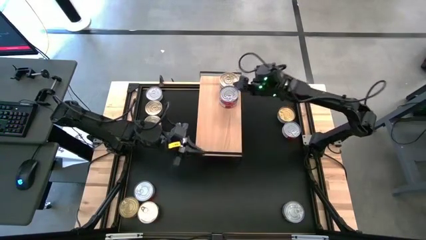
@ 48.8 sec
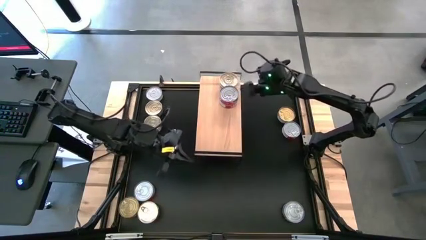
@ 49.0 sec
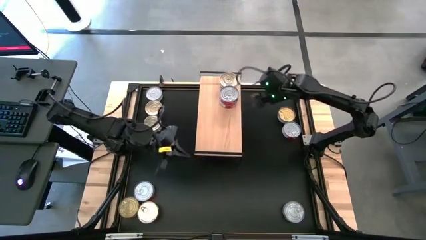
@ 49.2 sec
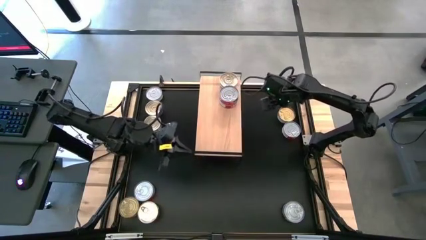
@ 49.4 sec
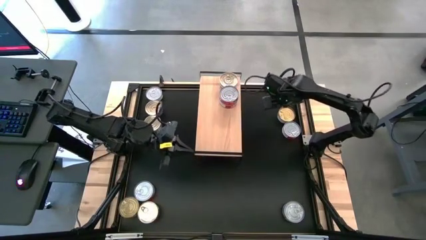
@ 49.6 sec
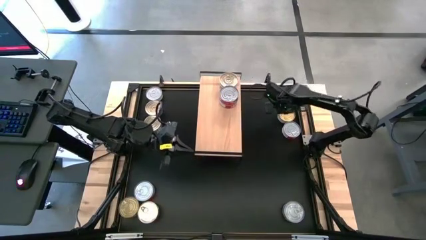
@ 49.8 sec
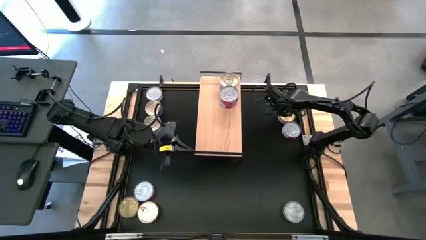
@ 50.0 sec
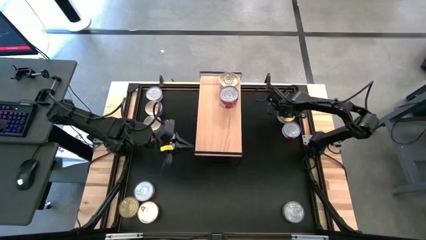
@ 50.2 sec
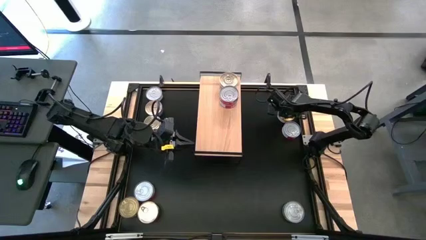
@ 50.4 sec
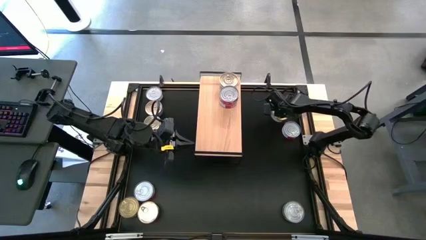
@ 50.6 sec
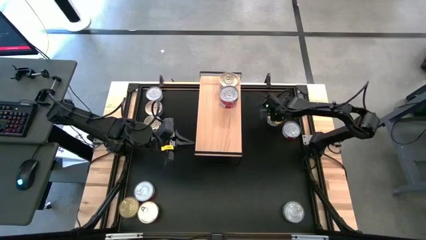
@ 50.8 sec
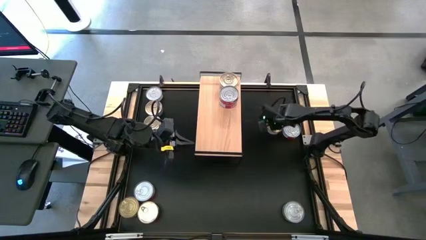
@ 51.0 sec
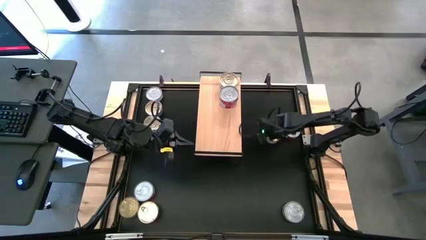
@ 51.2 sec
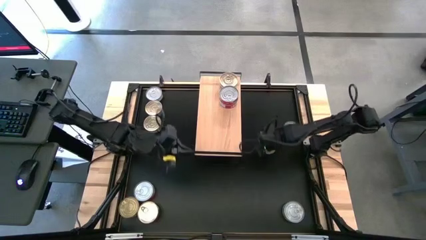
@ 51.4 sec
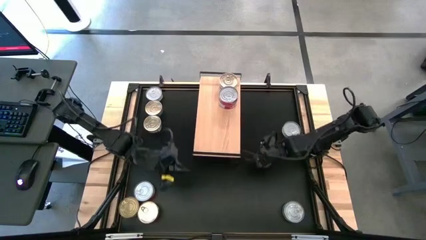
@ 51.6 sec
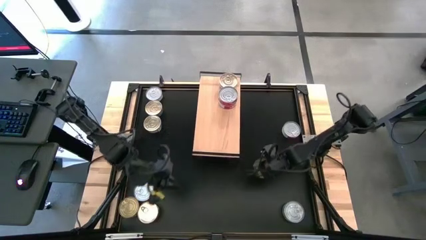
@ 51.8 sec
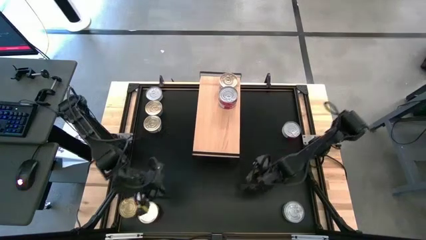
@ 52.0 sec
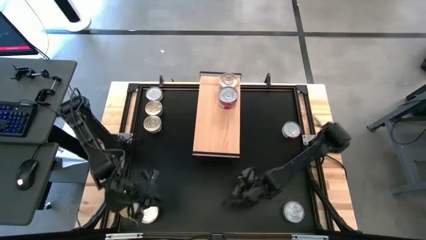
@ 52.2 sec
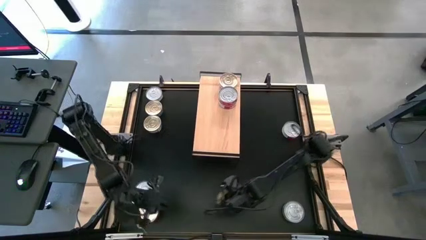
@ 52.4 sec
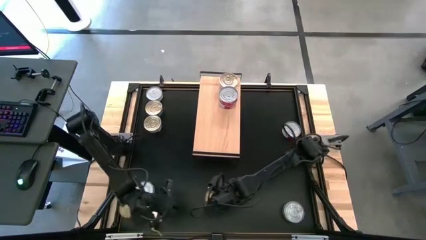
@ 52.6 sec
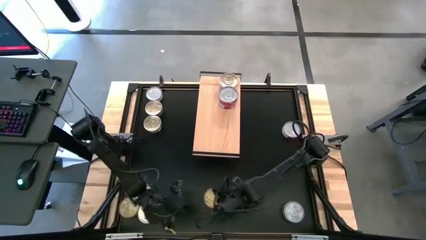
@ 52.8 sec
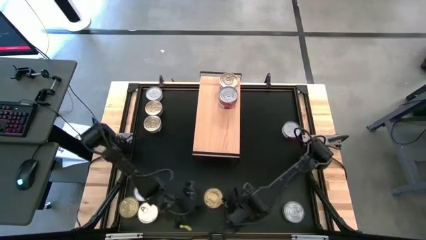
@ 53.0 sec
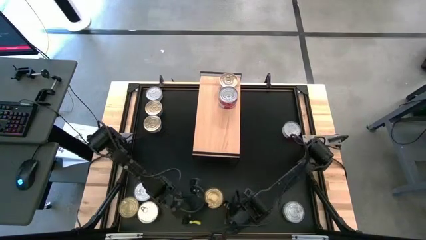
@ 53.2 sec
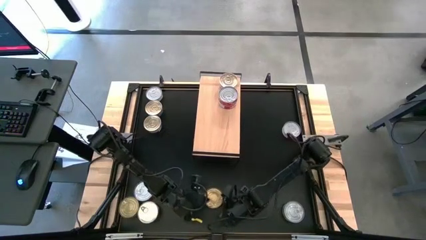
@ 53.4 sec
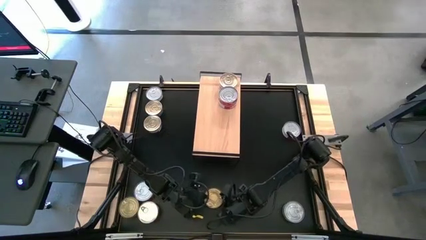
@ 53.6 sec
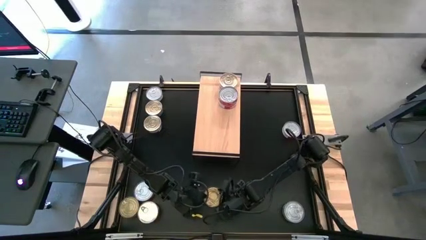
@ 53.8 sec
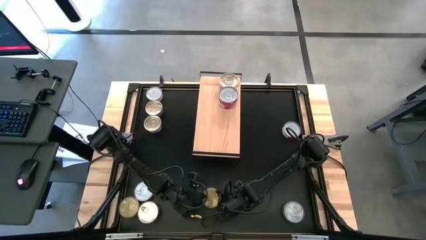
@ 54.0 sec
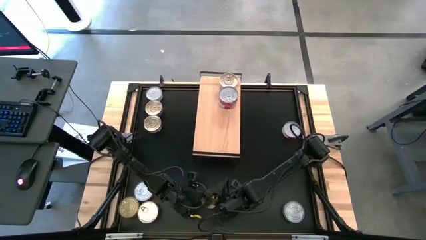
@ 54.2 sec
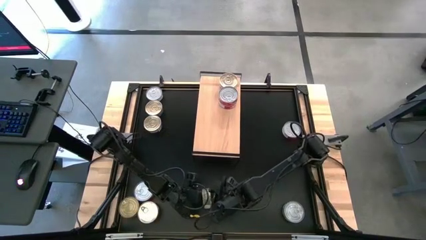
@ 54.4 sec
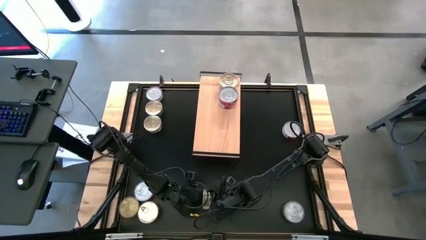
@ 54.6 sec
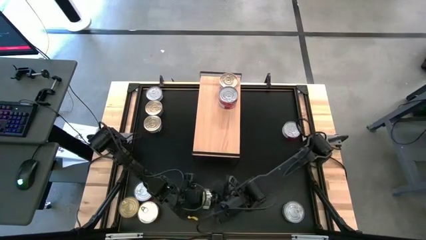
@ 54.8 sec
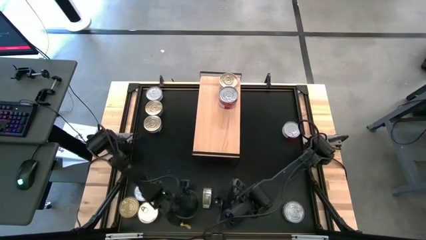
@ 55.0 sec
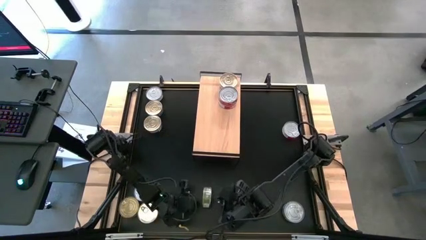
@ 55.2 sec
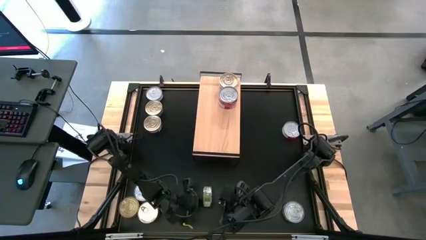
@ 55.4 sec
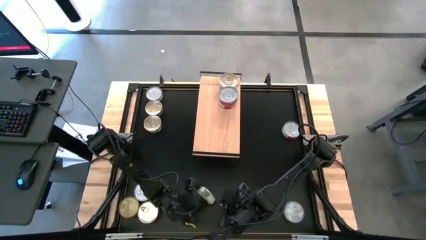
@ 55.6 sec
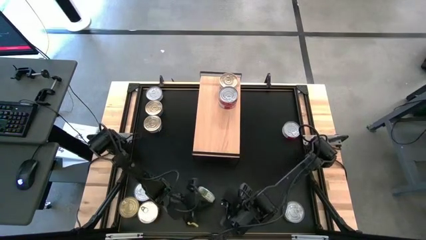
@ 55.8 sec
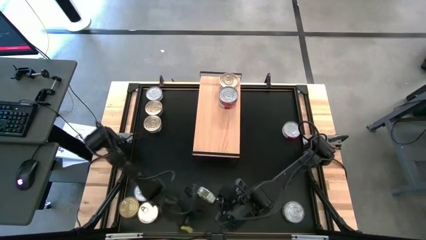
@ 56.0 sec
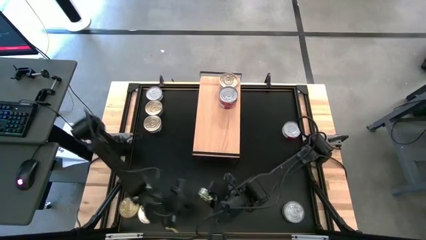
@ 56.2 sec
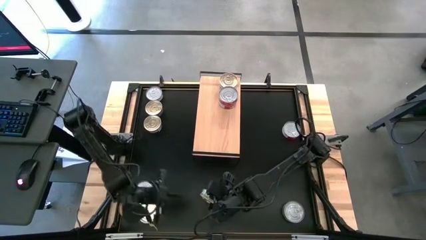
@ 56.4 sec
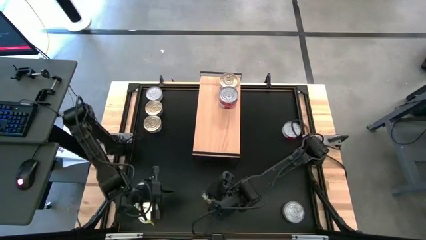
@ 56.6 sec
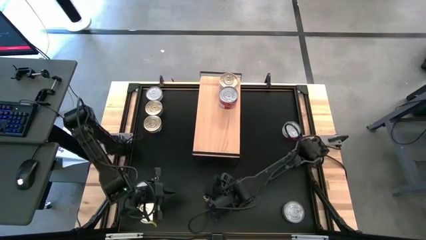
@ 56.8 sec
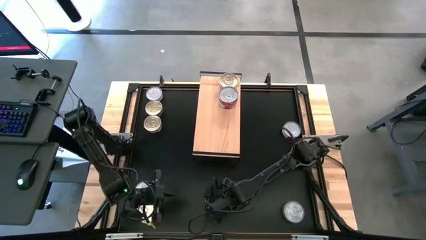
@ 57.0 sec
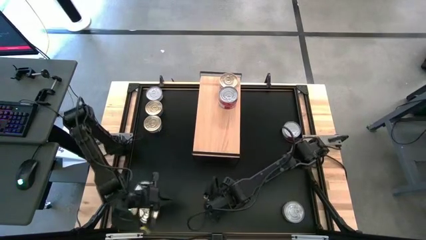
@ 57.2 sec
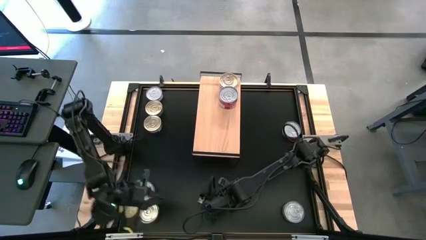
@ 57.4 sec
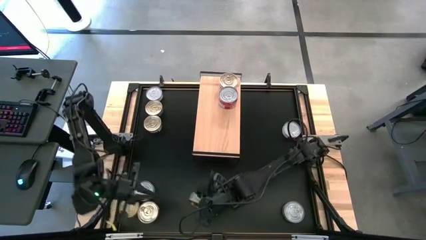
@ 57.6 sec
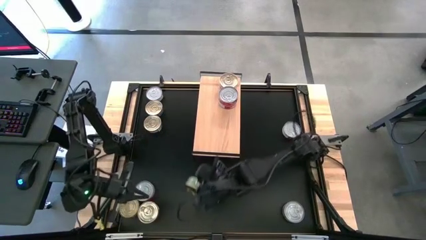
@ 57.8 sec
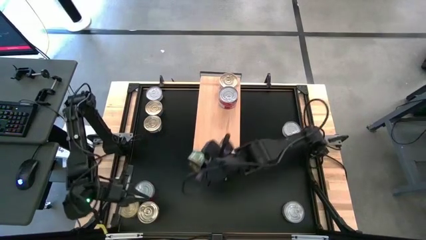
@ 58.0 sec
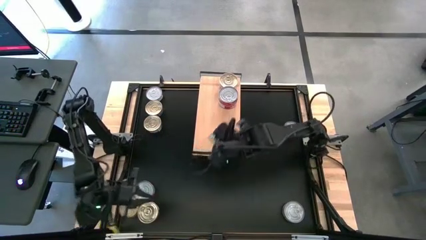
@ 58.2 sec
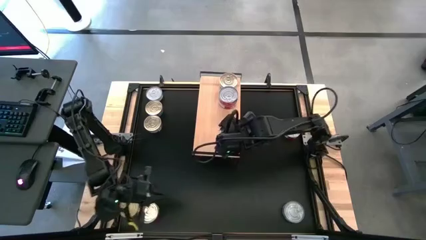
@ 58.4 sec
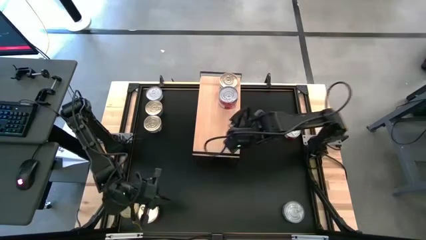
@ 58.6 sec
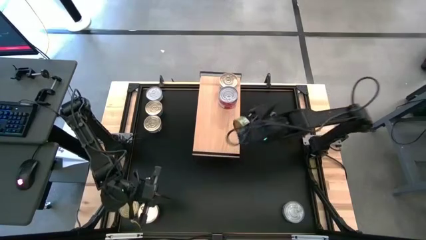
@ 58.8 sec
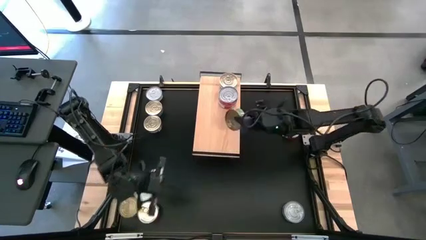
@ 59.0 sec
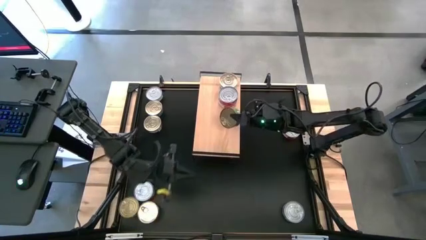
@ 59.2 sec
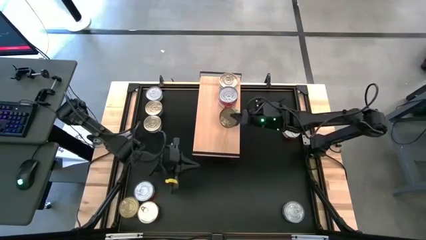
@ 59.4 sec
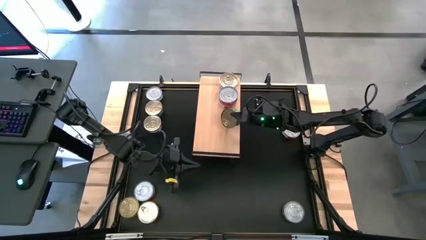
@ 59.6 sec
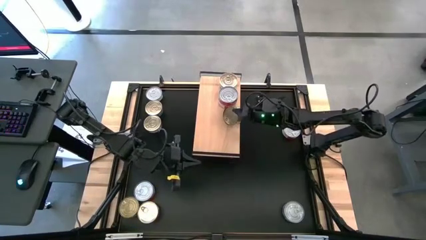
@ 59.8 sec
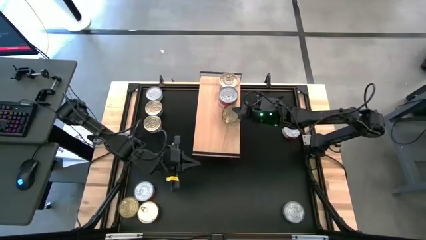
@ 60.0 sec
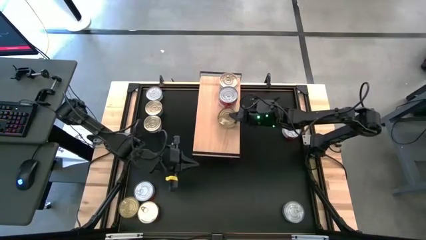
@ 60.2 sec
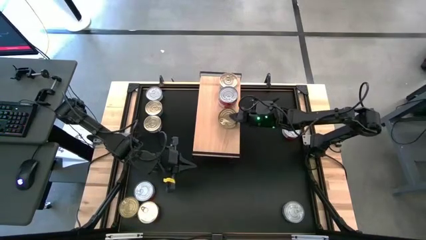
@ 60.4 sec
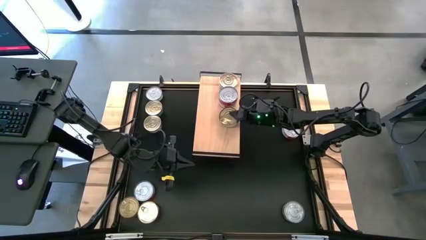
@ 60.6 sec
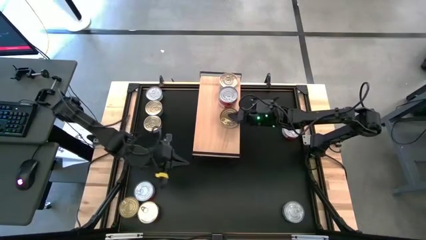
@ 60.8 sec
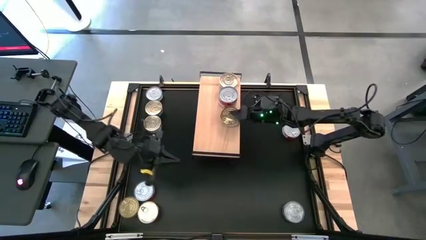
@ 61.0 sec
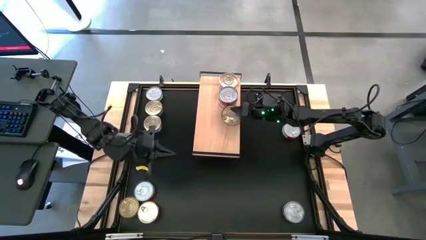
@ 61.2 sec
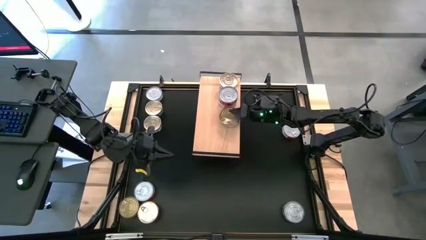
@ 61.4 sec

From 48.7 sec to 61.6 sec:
Task: Stack canned seafood by type on shelf
Put the green tuna can on the shelf

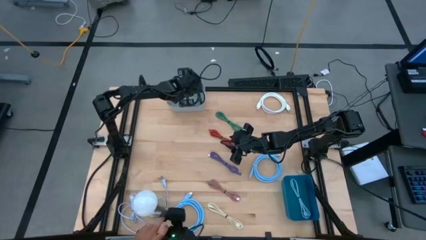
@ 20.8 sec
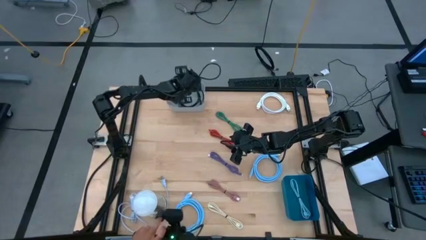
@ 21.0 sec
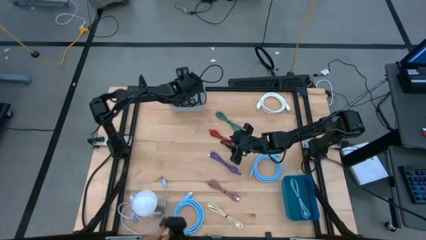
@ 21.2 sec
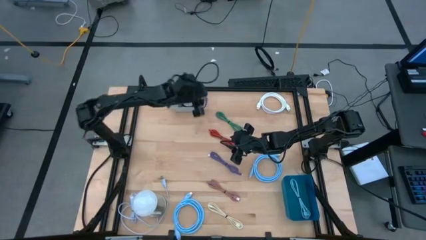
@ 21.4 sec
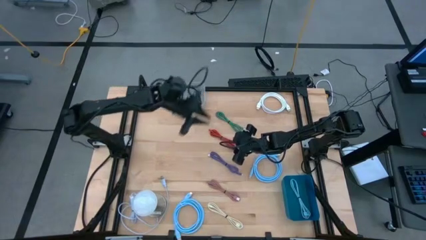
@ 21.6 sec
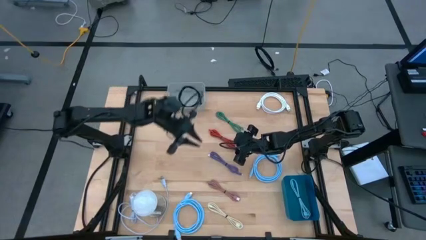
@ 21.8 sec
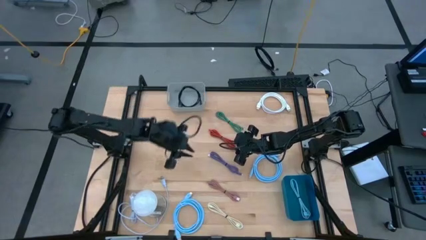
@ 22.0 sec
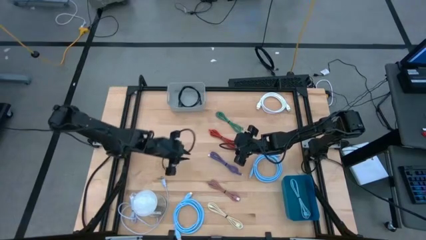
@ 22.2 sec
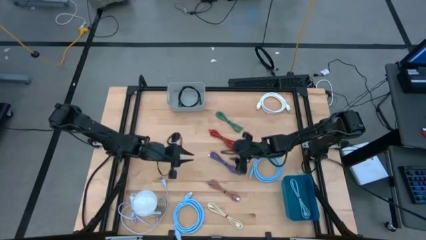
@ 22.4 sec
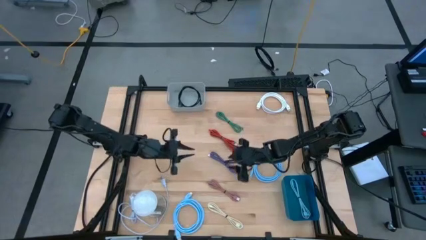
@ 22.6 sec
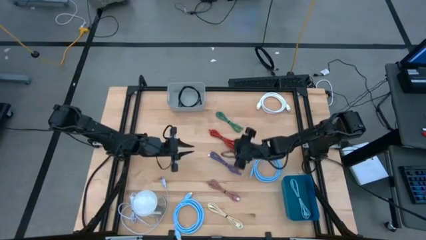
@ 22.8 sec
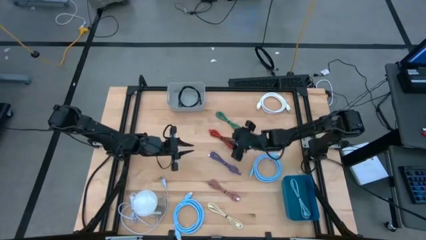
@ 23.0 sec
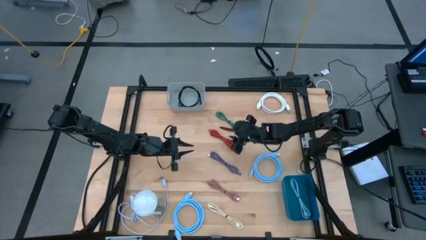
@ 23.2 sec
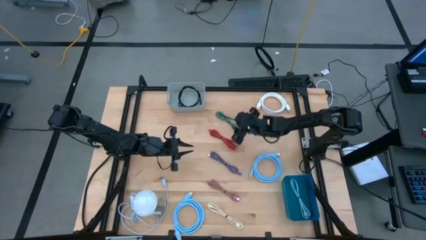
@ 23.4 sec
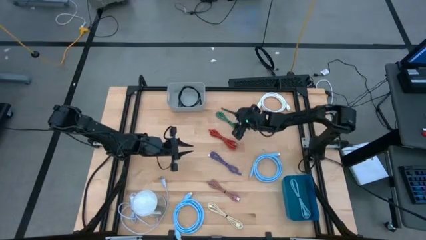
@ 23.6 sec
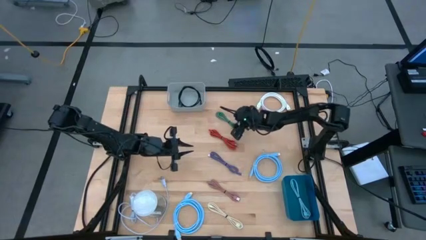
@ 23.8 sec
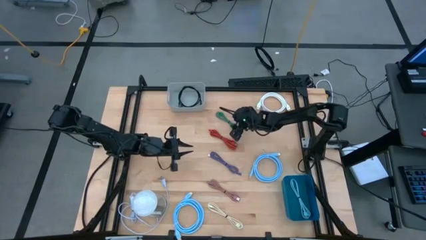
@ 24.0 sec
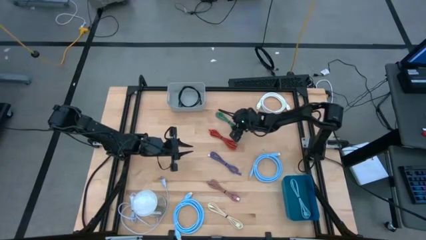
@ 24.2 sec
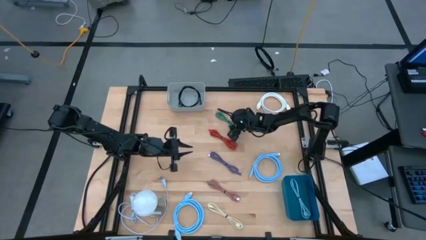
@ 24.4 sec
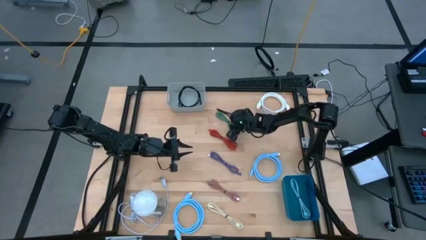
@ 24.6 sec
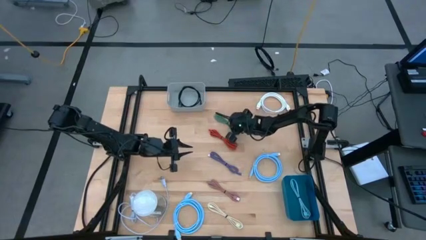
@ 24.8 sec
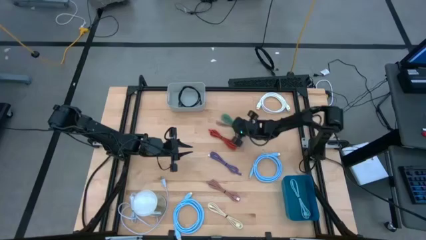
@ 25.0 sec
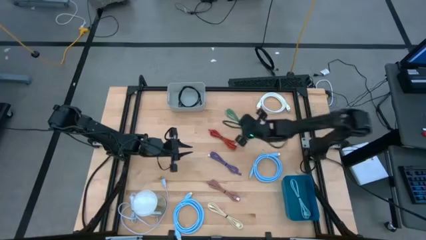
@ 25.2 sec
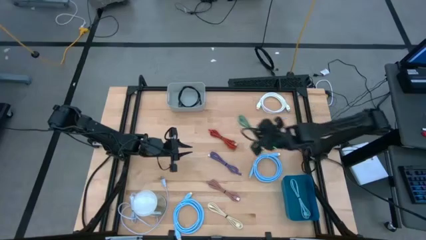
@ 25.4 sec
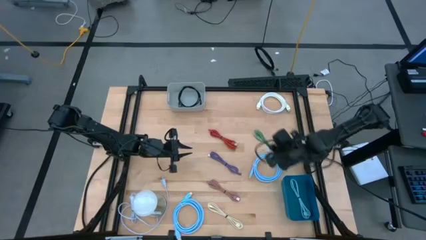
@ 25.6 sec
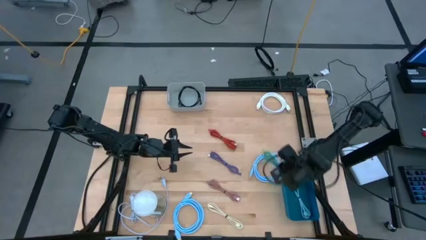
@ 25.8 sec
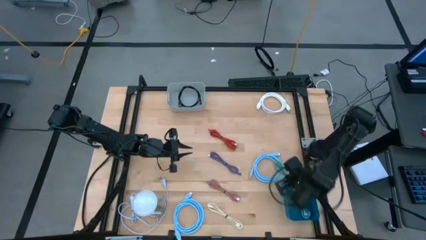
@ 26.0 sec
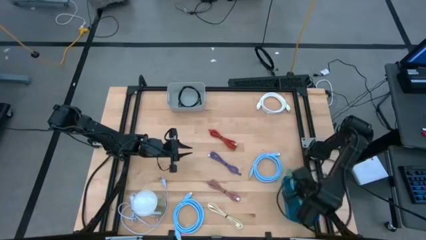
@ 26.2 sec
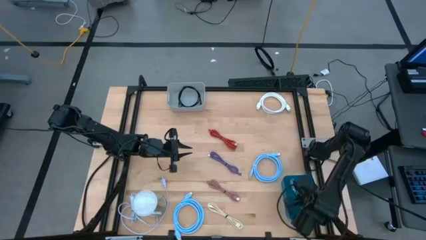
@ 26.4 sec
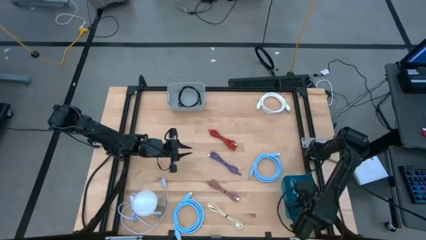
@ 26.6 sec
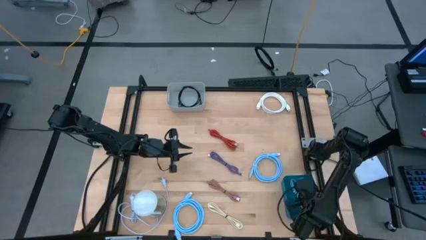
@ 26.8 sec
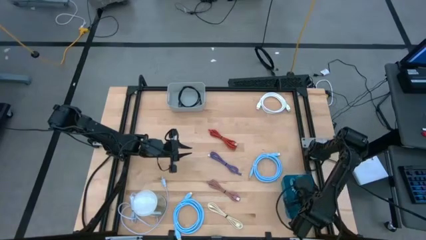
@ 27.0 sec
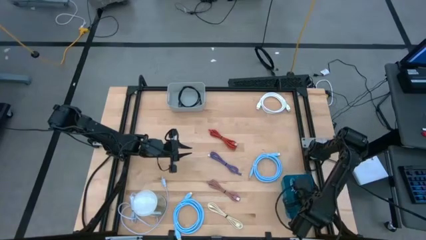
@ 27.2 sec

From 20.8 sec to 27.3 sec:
Task: Pick & Place USB Port
Put the green USB cable into the blue bin
